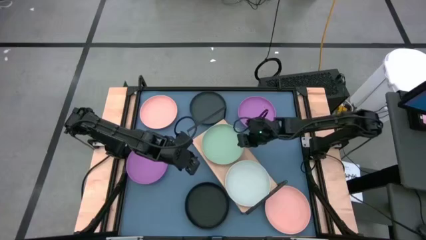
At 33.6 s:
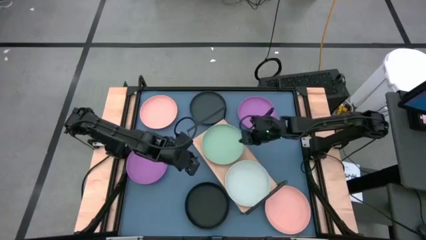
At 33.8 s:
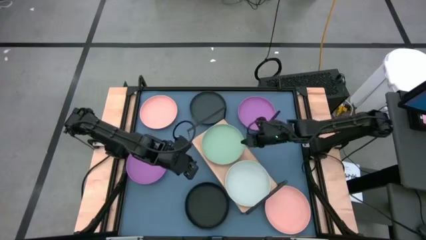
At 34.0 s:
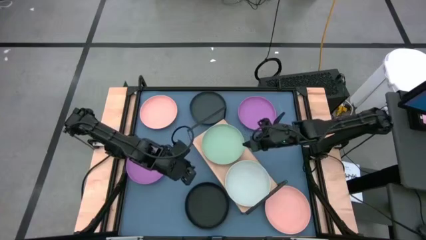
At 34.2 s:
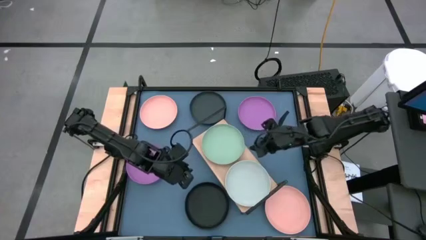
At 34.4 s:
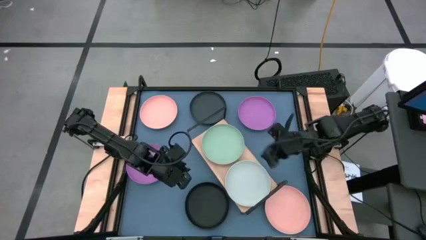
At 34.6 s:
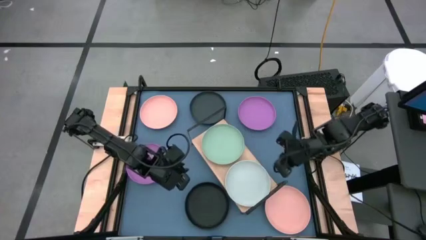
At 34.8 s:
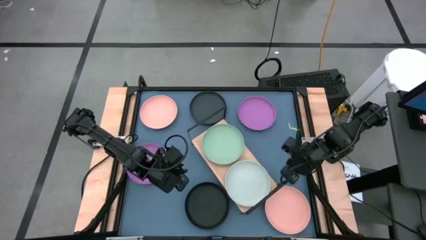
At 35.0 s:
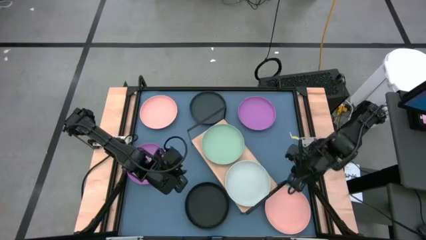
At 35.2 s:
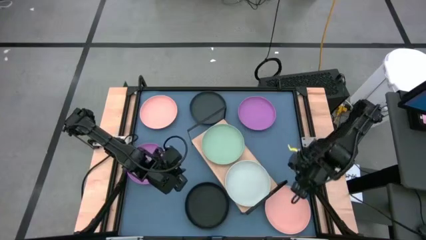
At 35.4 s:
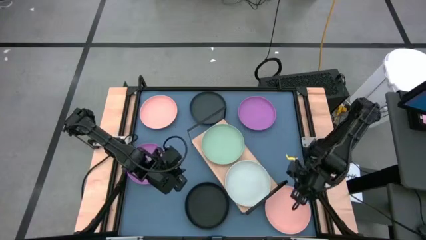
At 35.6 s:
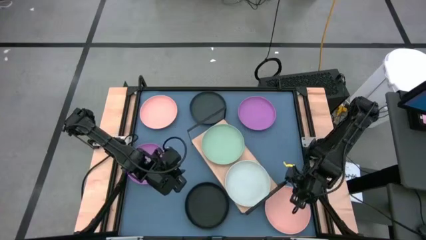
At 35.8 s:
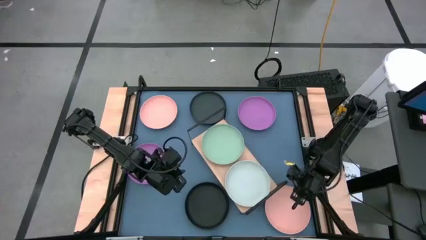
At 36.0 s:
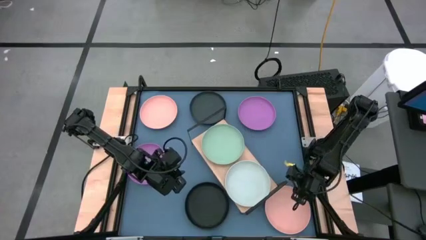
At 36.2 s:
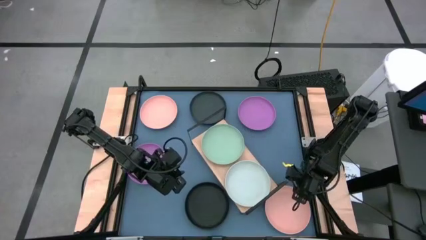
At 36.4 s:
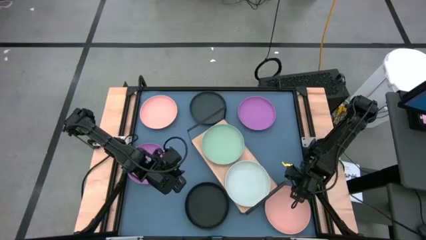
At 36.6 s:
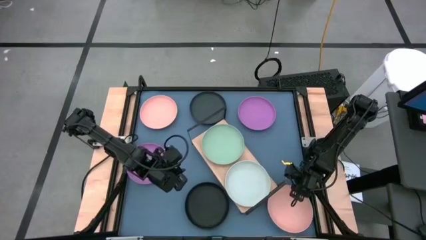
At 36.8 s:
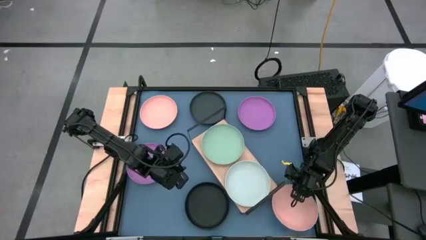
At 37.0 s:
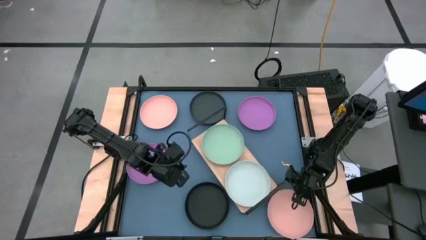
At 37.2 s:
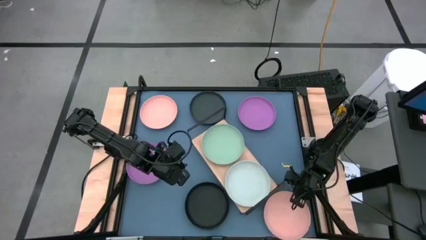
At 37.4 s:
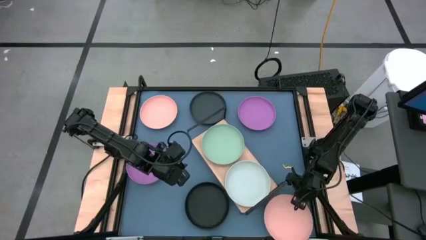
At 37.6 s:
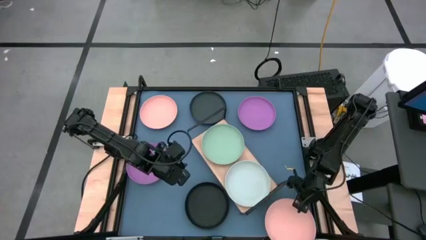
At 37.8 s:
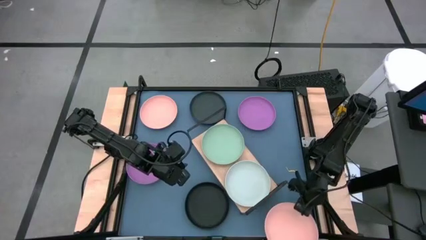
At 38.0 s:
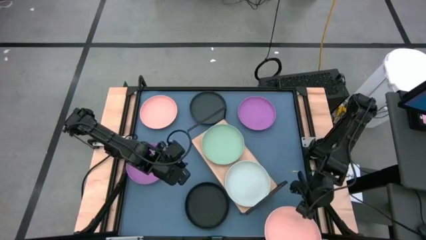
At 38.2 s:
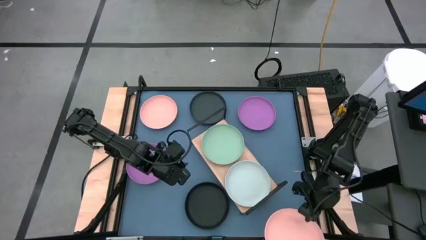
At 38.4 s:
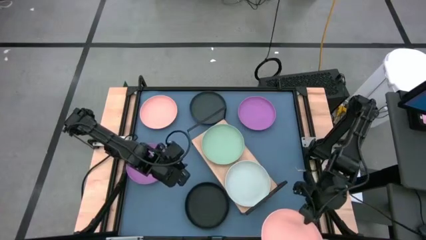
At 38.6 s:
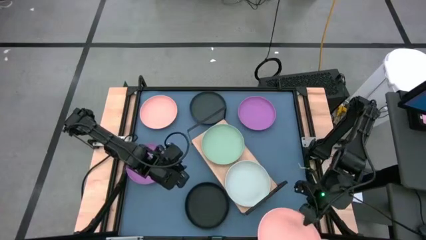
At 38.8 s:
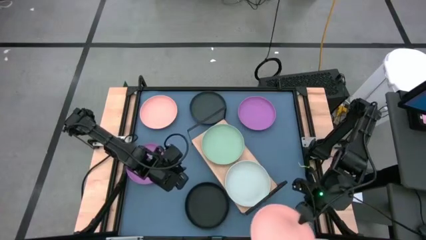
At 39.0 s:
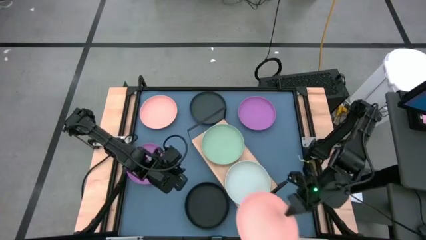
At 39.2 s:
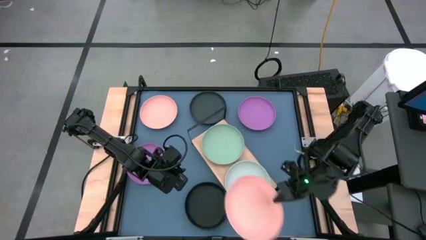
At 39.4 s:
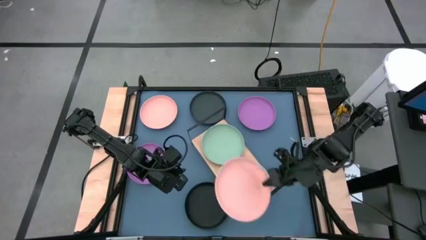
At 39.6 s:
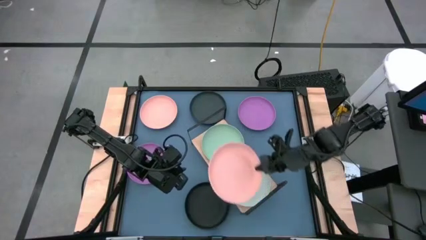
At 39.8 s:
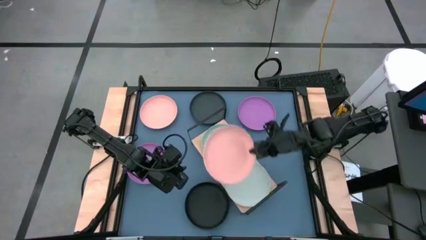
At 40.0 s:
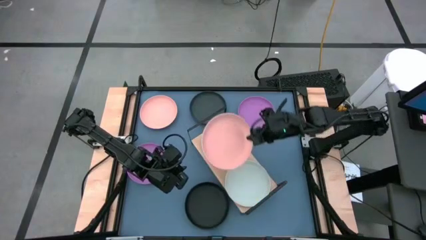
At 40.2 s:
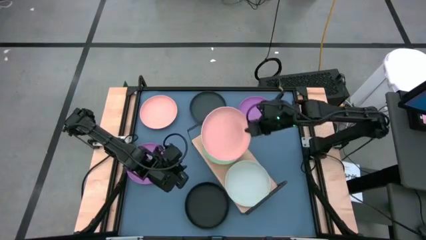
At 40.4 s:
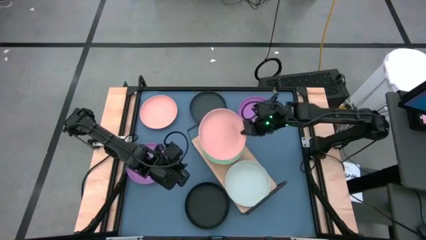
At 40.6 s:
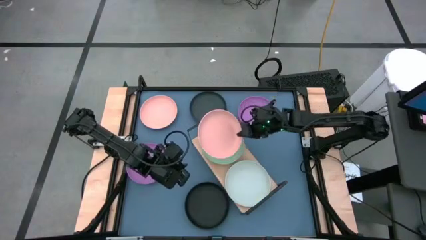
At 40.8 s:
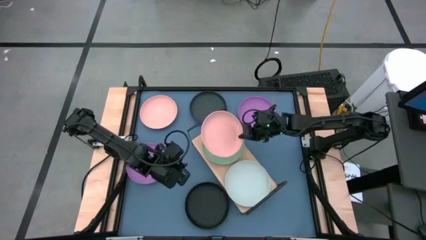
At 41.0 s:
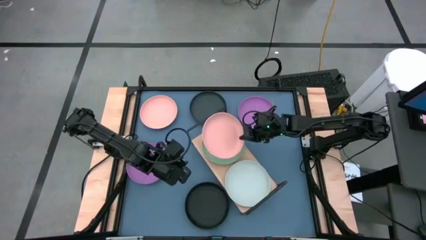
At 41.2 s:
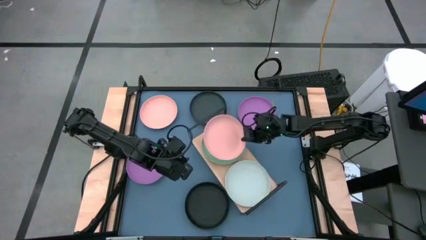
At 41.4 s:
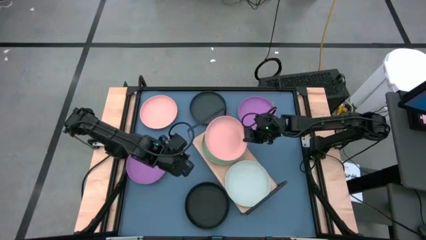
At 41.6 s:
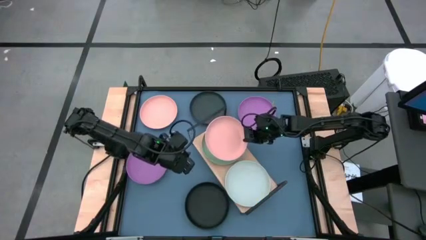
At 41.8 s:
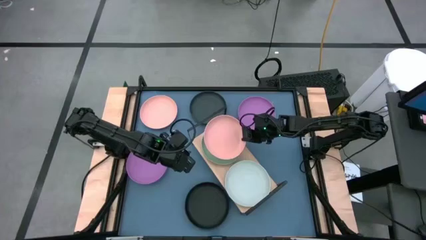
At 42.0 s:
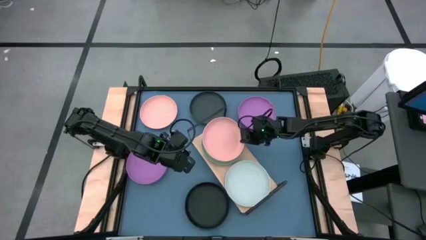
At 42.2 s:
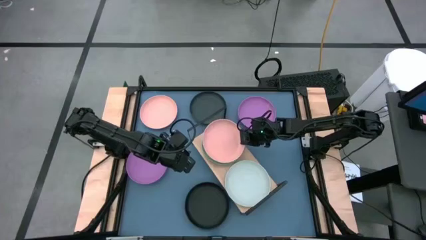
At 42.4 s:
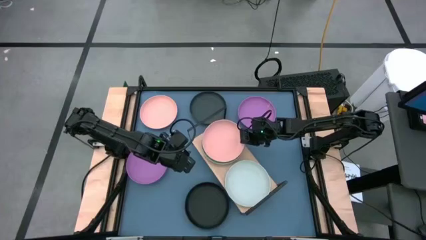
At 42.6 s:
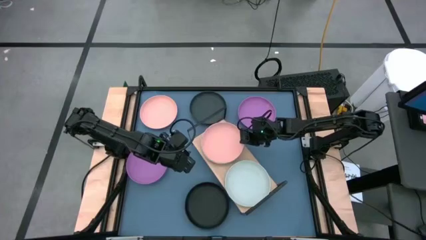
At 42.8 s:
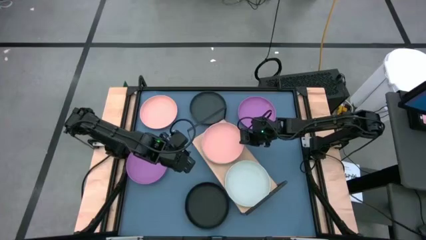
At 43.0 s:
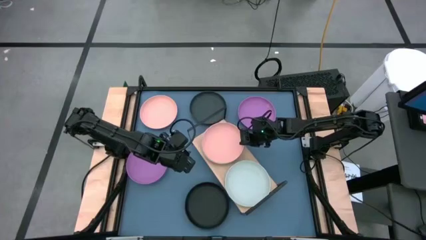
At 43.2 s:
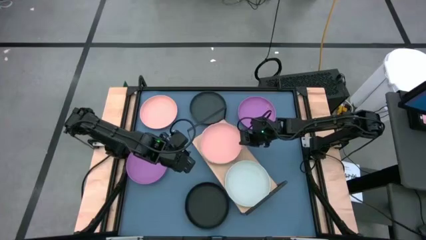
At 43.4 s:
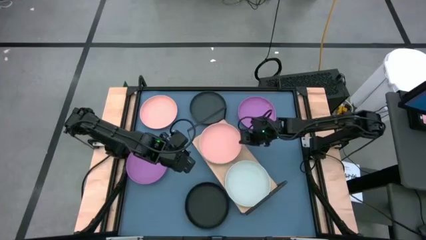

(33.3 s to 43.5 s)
Task: Place and stack plates onto a shelf
Stack the bottom light orange plate on top of the green plate on the shelf

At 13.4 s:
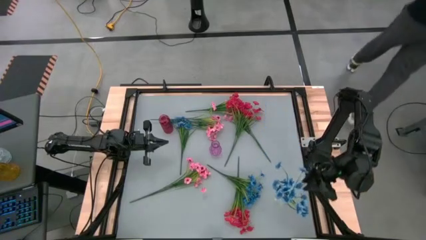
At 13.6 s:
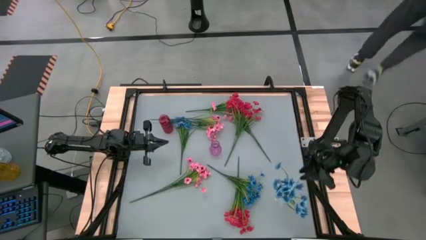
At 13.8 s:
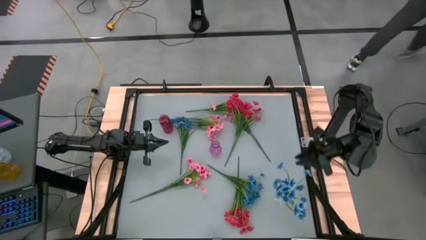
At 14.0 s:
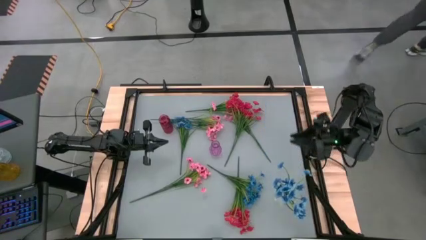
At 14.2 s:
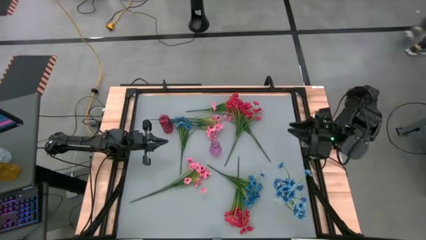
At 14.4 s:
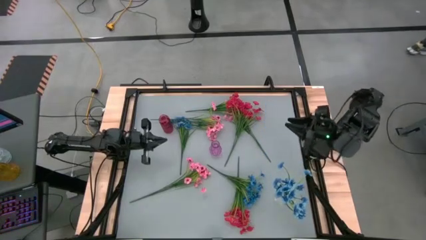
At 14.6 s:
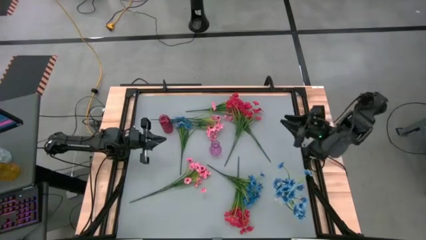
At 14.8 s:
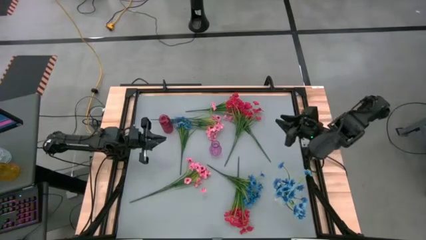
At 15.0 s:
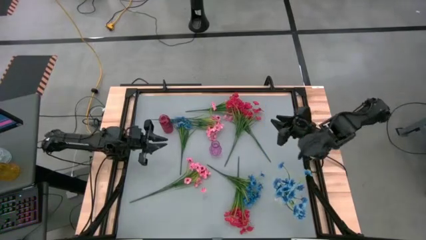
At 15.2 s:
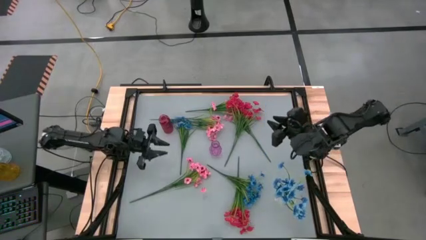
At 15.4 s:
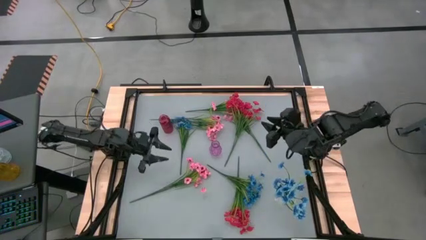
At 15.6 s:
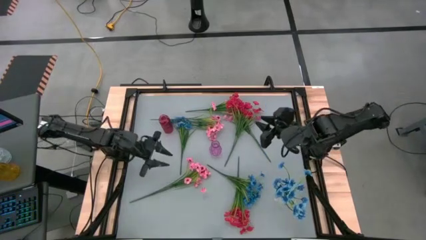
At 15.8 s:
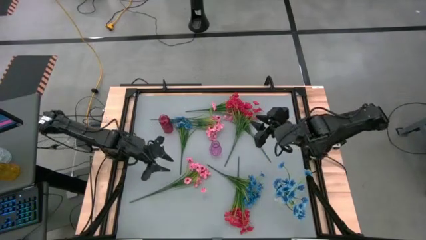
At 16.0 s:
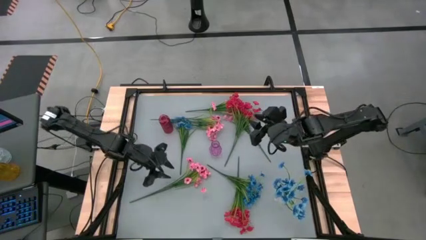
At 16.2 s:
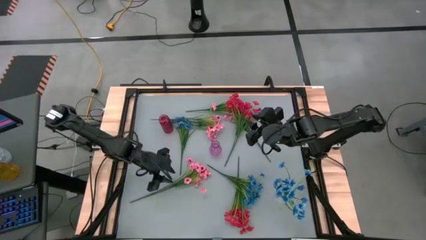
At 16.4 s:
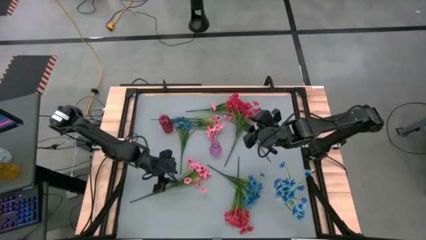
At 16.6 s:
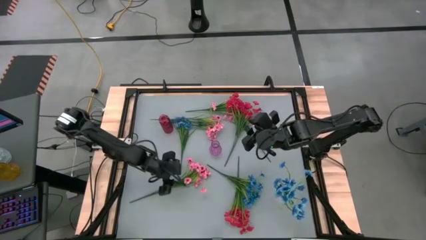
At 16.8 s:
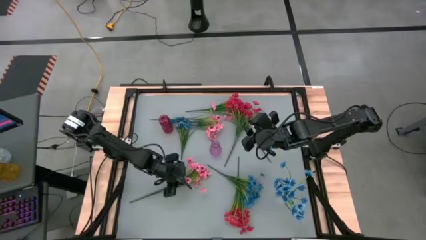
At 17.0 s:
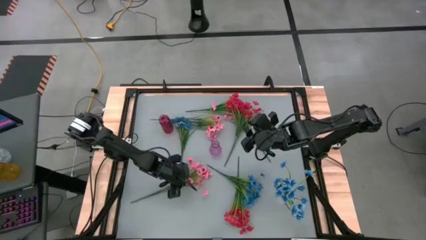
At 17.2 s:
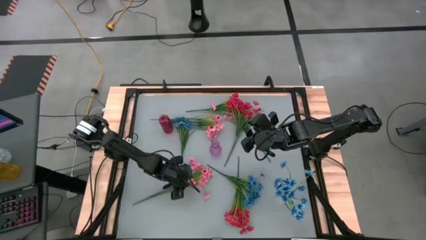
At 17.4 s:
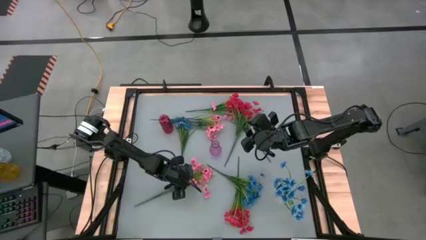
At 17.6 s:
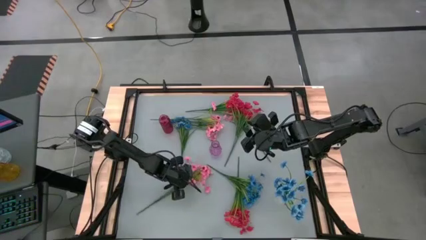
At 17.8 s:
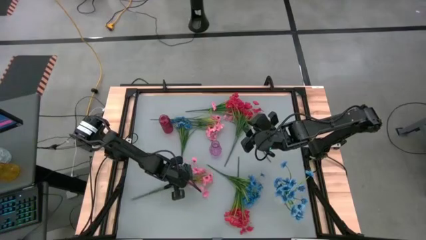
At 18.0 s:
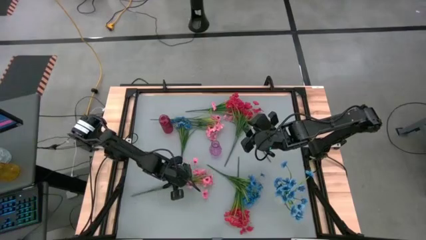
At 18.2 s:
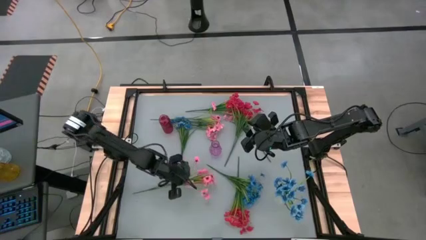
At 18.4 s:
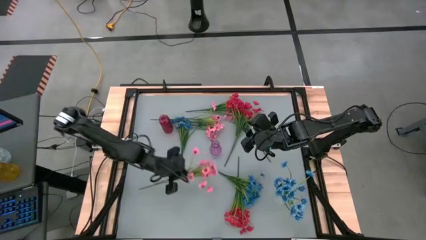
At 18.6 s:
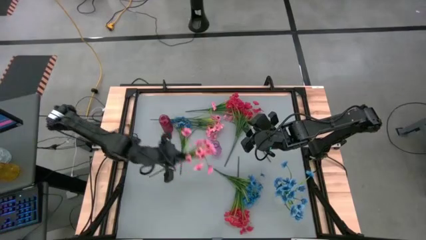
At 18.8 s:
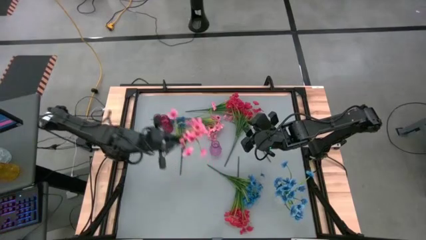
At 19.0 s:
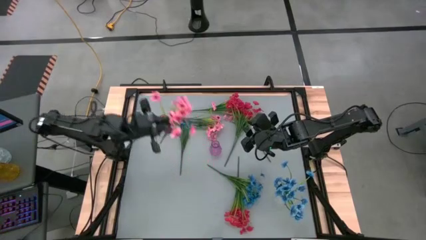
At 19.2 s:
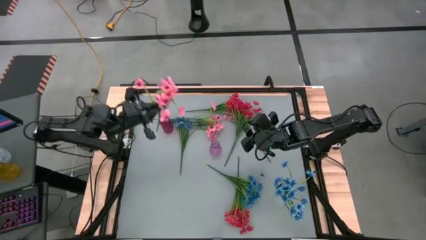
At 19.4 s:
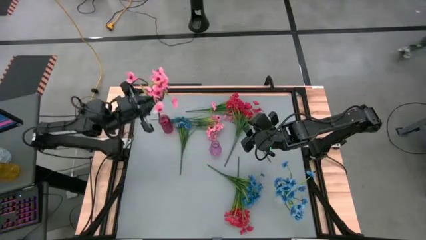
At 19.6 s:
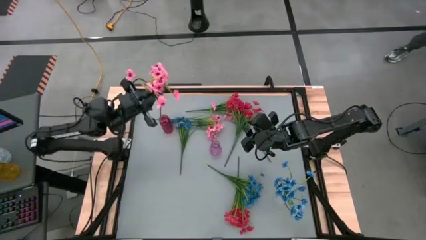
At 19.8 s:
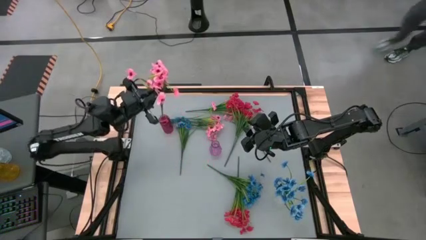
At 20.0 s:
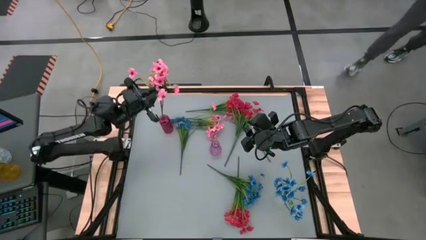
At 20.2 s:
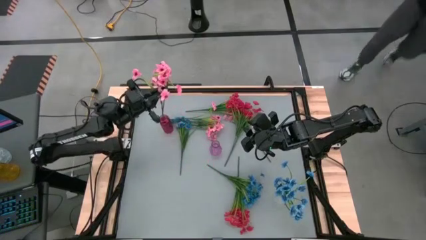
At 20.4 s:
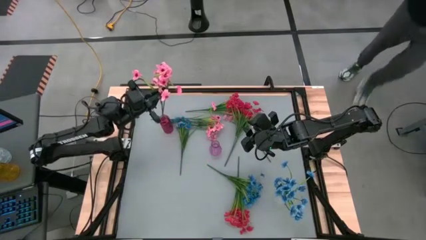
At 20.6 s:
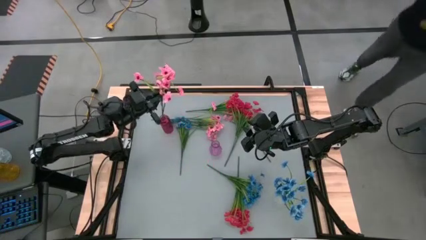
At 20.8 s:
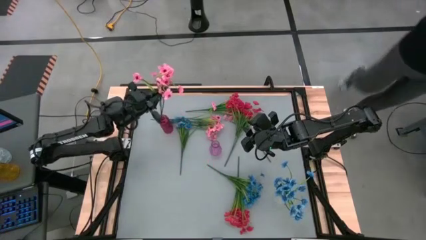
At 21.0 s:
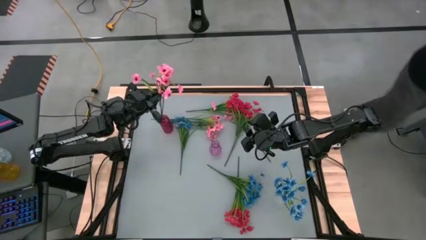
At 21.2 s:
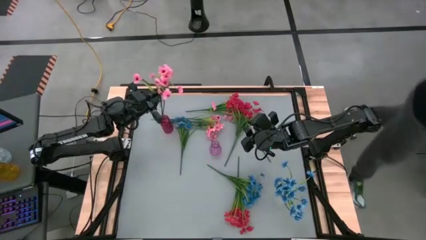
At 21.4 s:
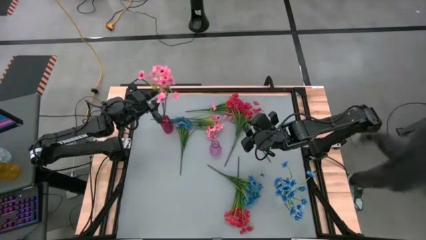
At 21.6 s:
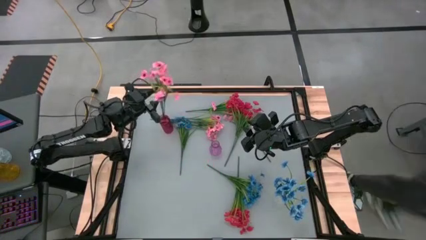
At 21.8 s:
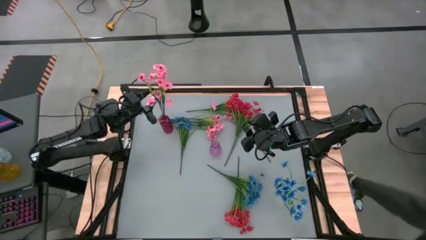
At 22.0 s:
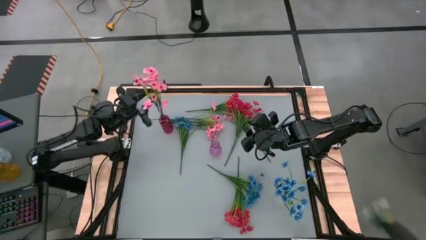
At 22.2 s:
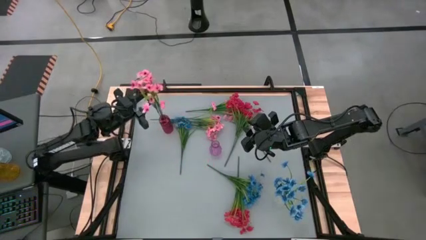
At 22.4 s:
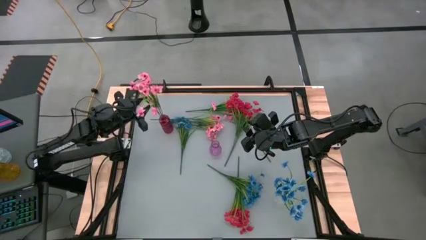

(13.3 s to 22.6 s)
Task: Sort flowers into vase by color
Put the bottom pink flowers into the red vase
